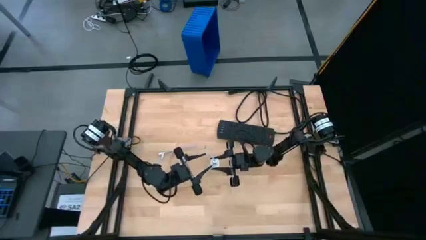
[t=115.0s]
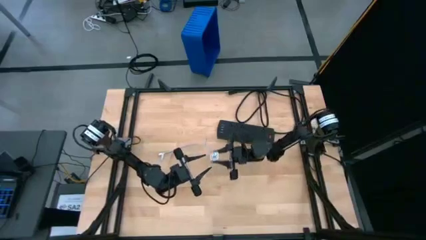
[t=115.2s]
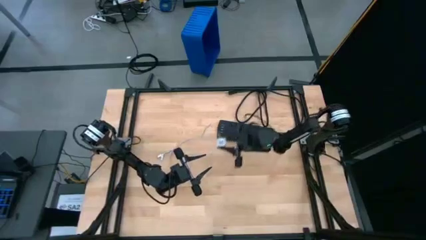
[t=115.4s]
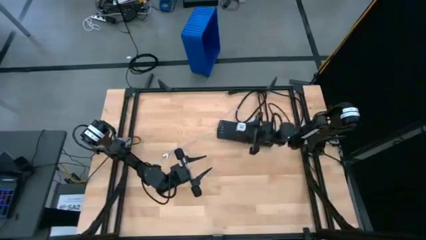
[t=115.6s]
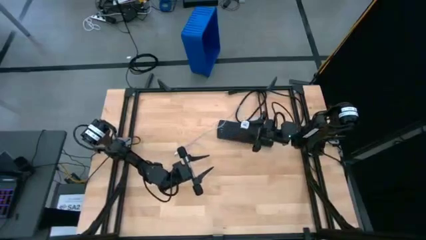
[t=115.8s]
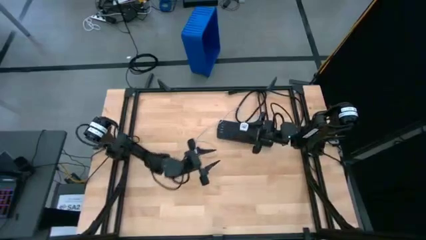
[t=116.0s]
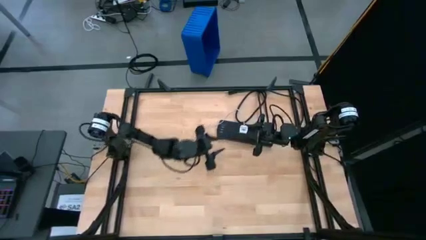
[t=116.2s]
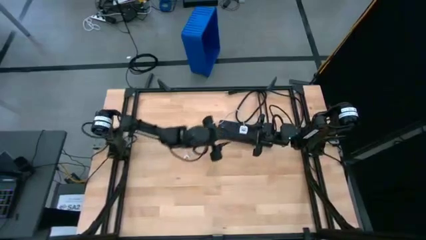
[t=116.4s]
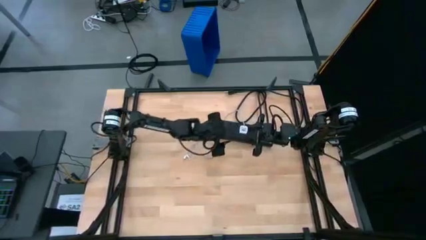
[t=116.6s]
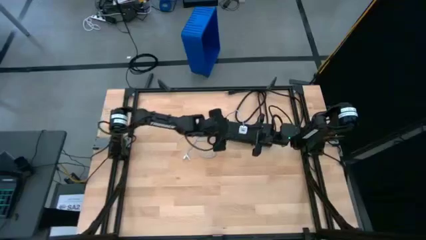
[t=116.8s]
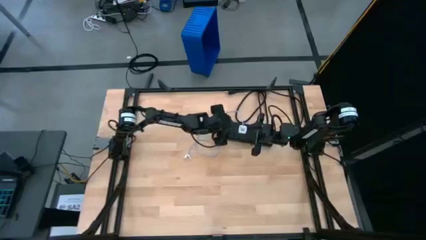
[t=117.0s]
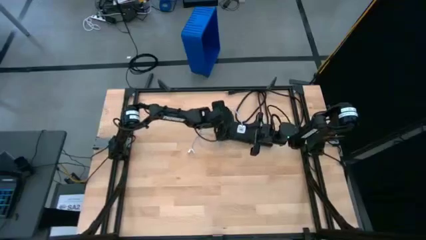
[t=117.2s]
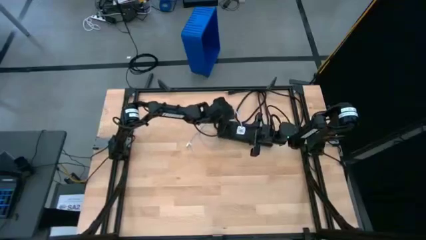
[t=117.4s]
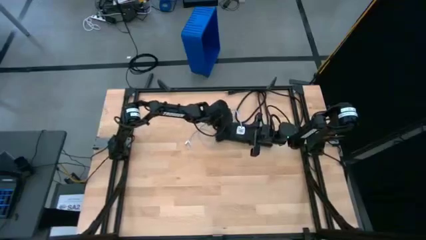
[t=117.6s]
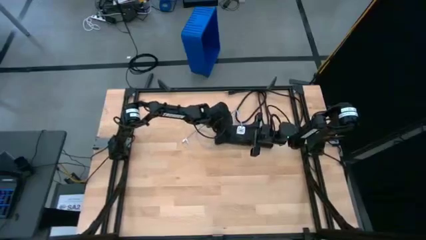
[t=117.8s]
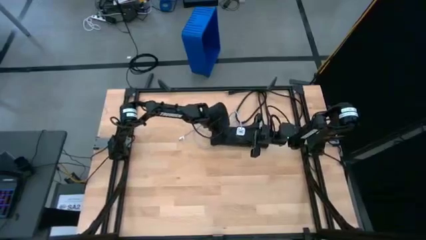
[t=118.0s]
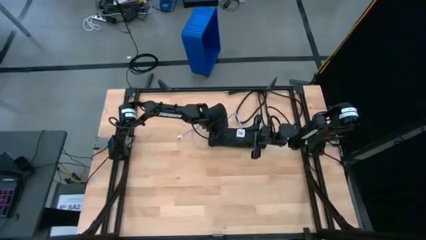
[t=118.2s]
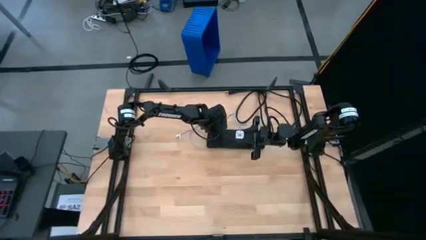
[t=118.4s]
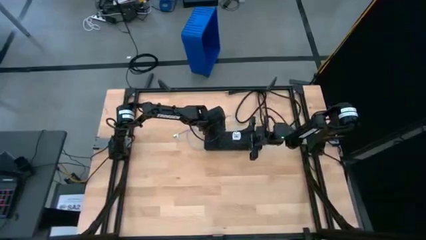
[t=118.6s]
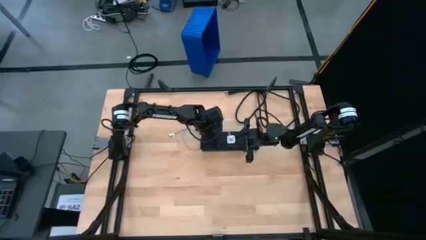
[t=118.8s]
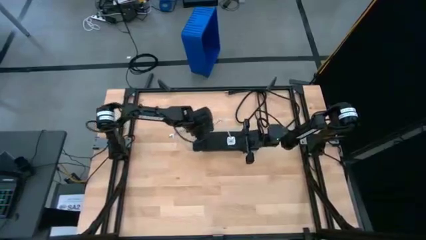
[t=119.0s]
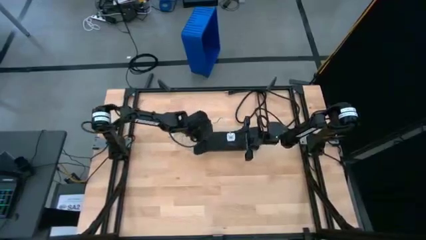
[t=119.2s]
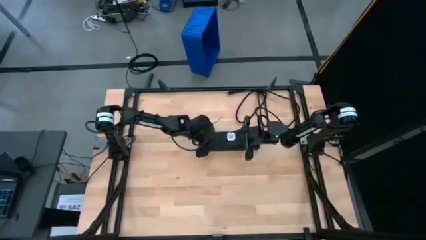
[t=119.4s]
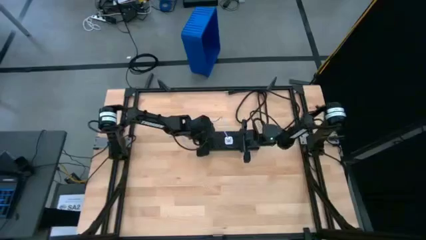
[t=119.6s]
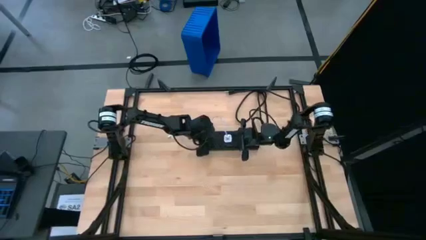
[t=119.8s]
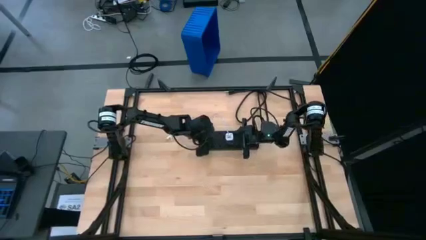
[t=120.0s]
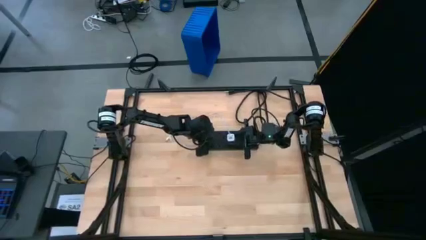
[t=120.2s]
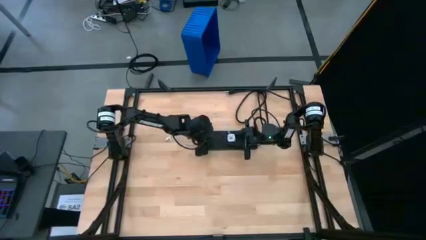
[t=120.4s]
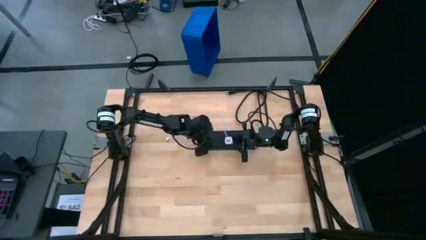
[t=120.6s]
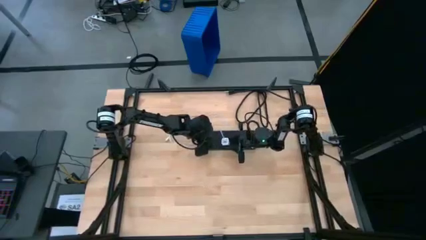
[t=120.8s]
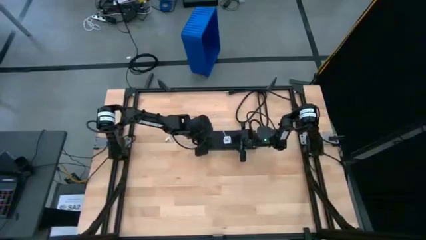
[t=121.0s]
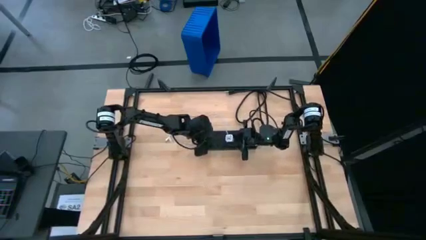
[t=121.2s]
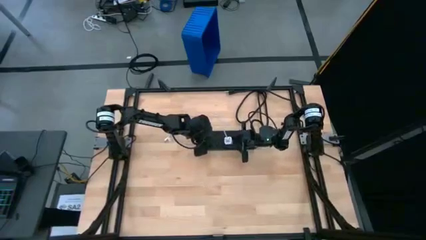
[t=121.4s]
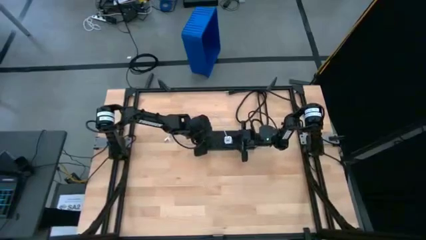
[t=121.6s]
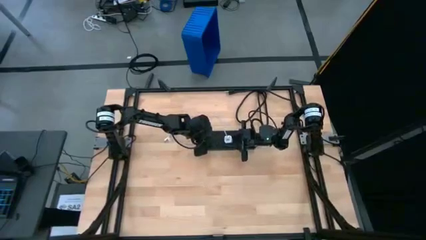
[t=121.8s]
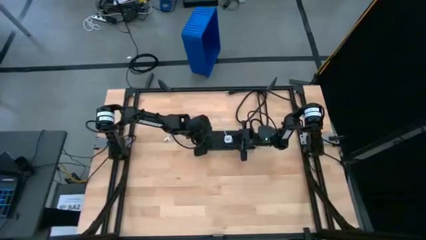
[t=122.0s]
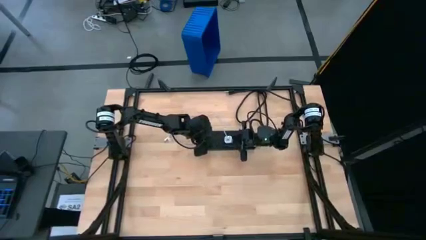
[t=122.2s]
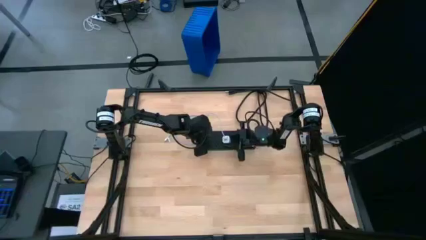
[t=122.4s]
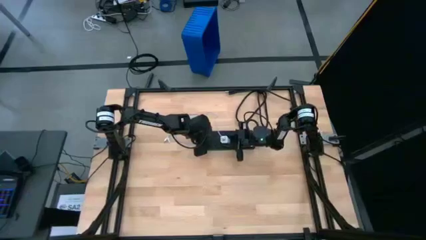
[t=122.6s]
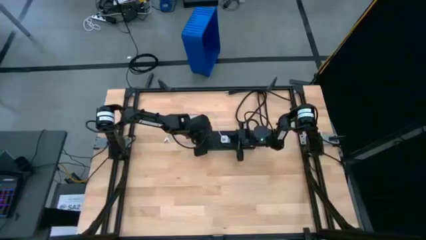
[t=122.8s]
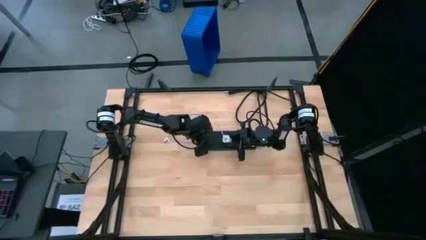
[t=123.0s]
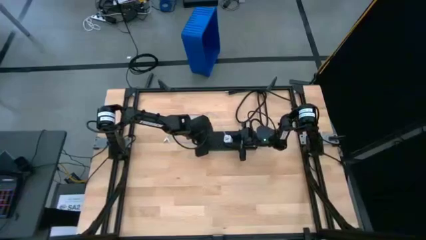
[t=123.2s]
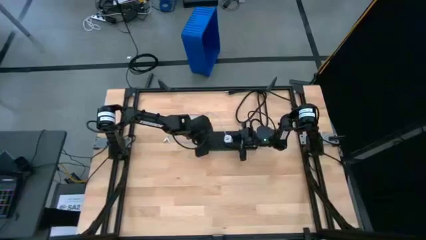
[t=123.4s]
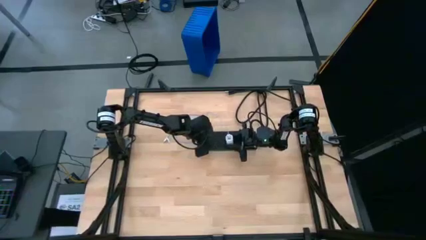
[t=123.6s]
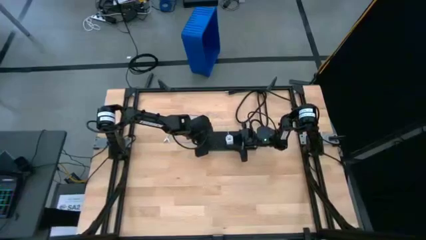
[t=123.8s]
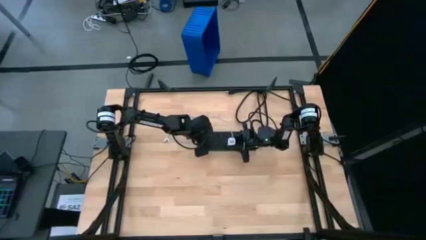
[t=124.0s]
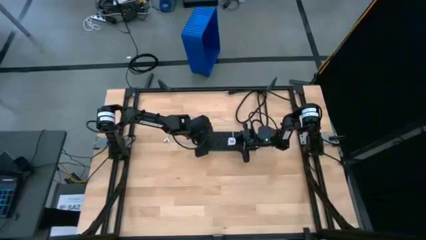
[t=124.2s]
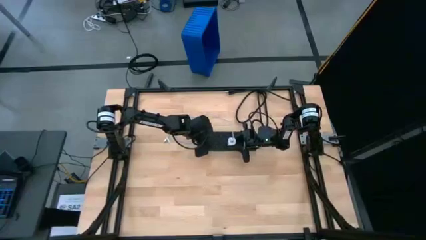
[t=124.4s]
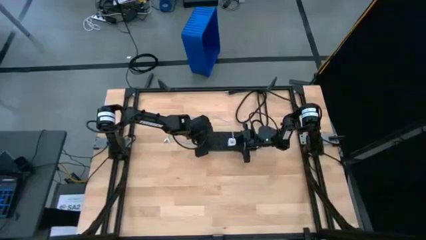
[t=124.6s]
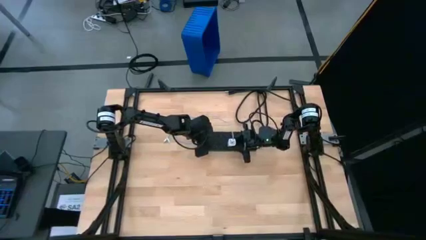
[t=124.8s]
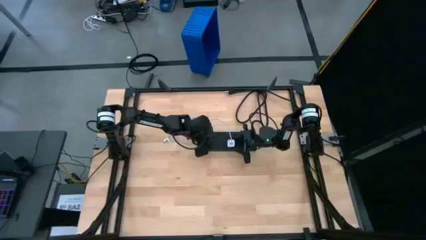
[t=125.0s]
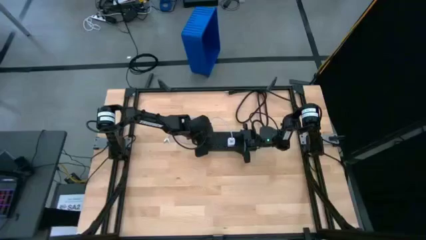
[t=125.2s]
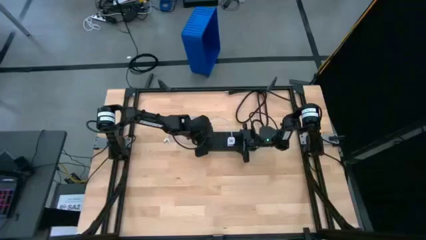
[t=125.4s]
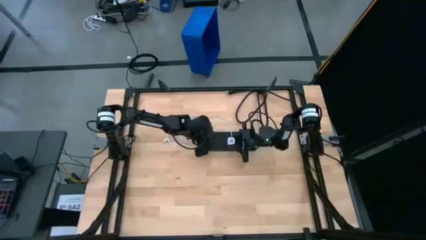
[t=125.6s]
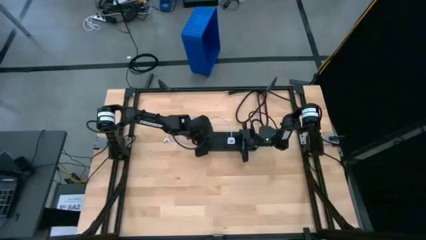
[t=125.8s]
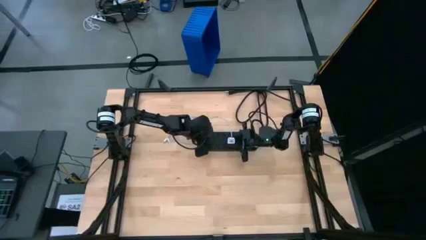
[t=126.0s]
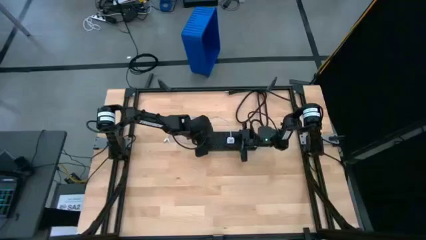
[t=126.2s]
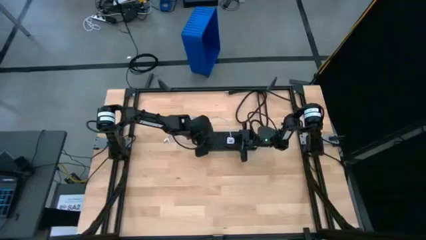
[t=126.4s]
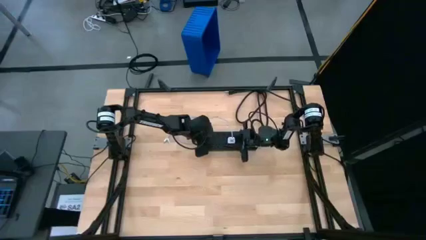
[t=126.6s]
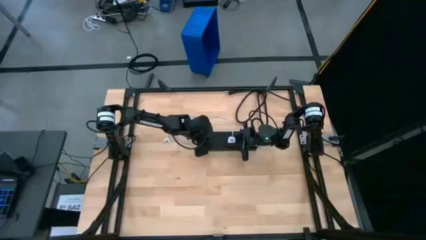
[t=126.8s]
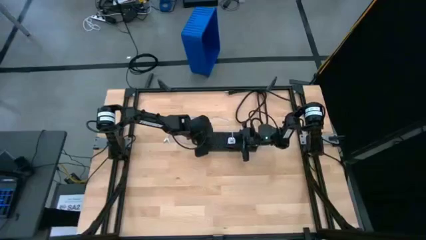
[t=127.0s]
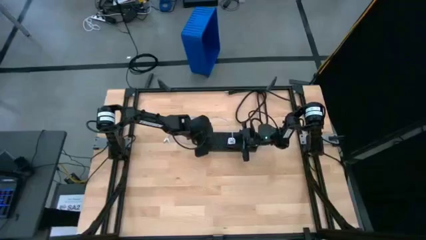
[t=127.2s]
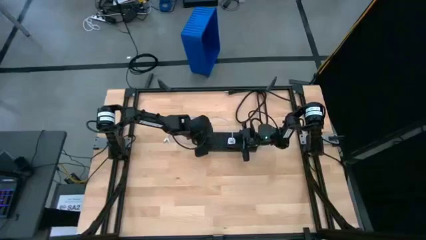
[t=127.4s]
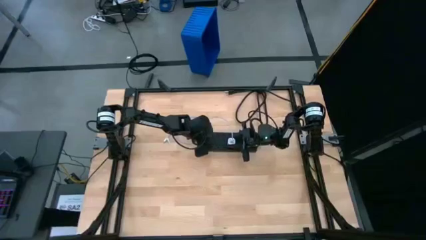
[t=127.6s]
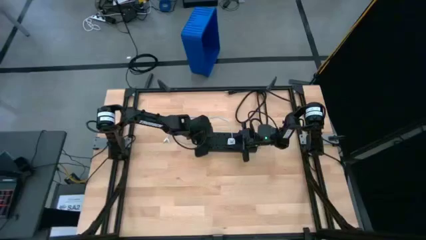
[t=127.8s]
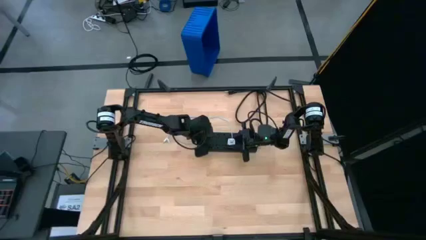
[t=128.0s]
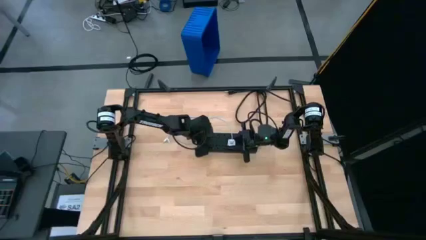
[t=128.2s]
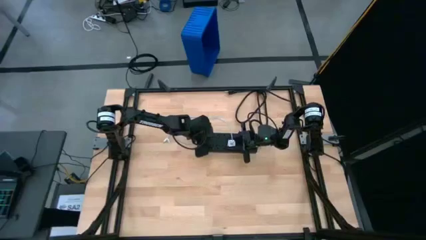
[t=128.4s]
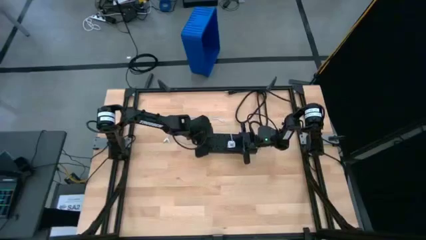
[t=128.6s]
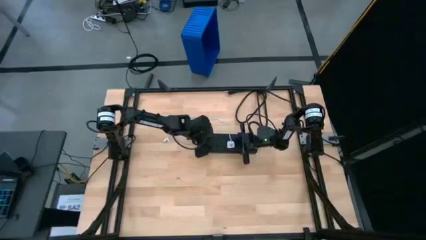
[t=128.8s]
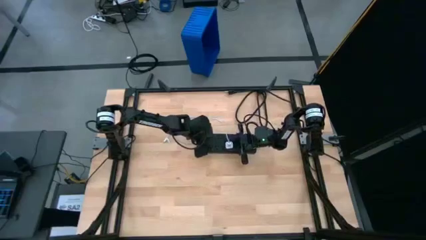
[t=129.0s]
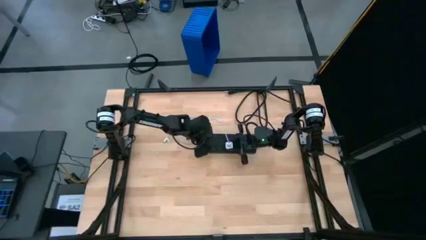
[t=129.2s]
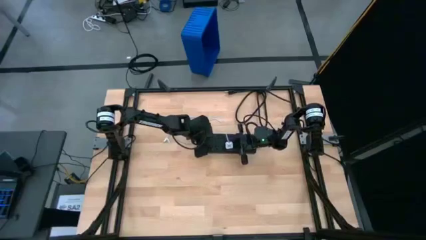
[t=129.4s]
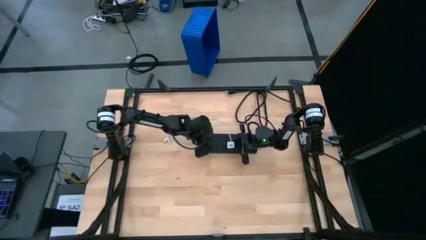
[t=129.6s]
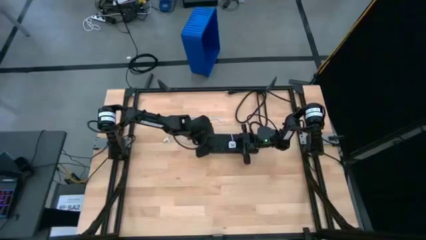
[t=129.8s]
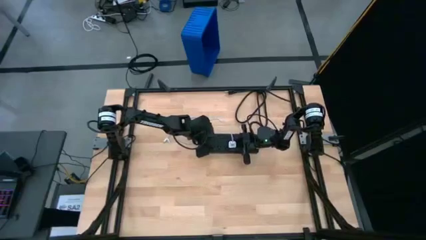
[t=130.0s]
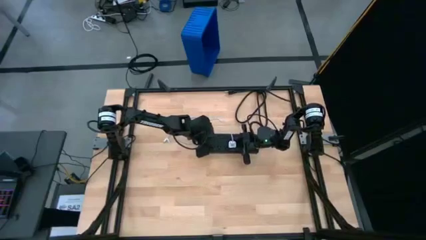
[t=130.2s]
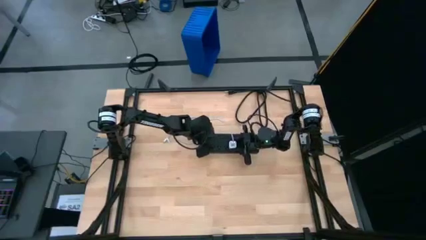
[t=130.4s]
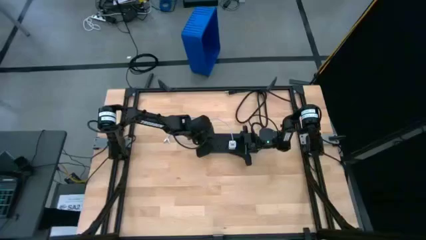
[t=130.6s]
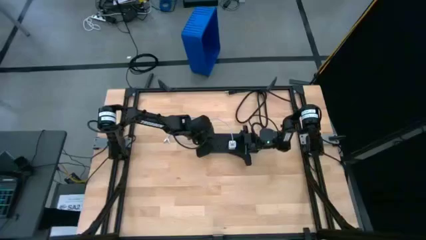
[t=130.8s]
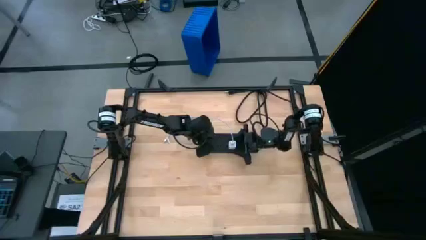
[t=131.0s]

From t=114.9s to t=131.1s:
Task: Insert USB
Insert the white charger adapter into the black outlet extension
